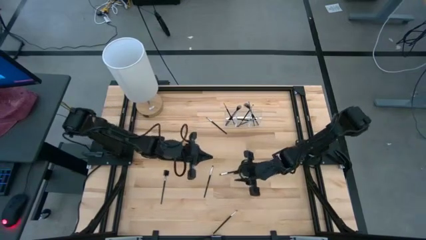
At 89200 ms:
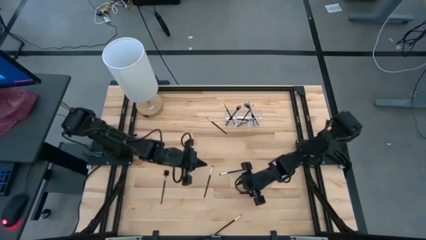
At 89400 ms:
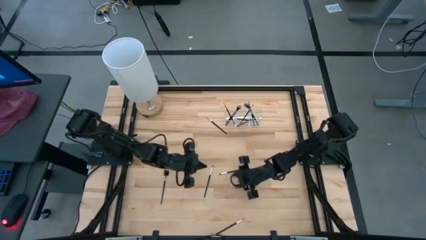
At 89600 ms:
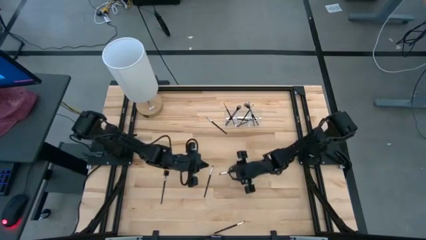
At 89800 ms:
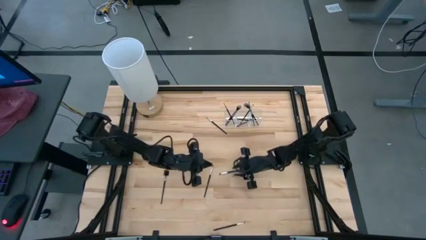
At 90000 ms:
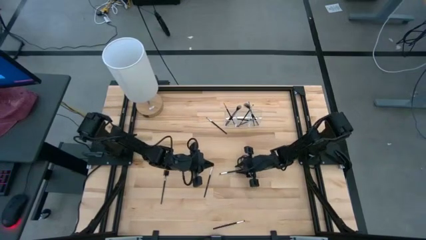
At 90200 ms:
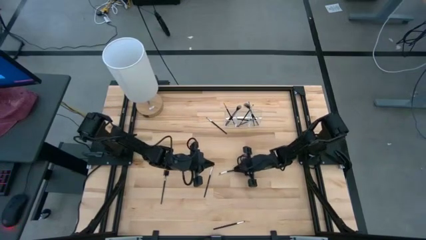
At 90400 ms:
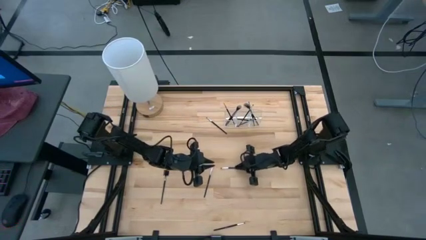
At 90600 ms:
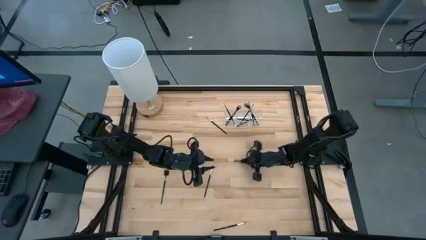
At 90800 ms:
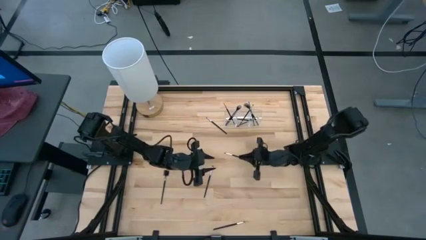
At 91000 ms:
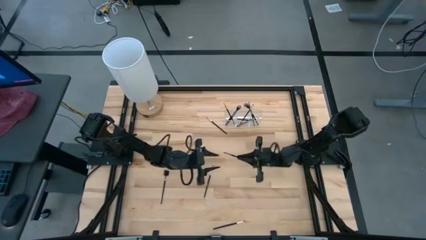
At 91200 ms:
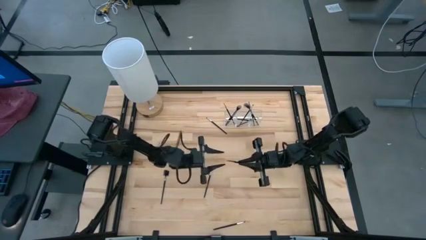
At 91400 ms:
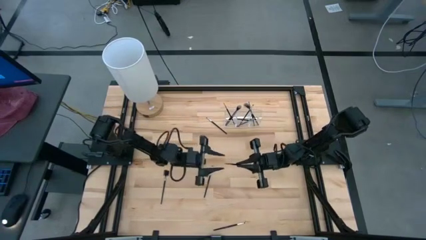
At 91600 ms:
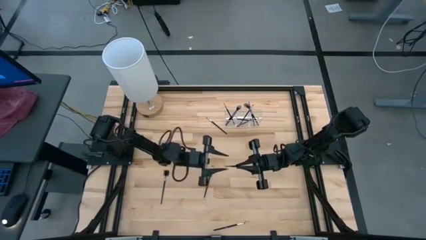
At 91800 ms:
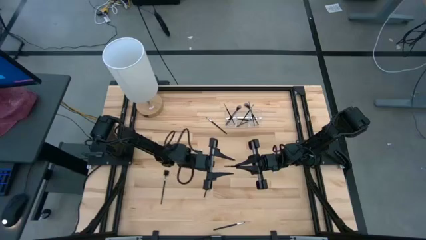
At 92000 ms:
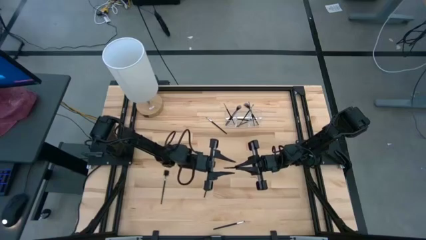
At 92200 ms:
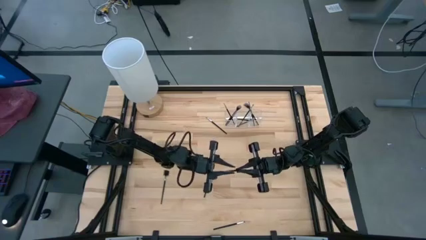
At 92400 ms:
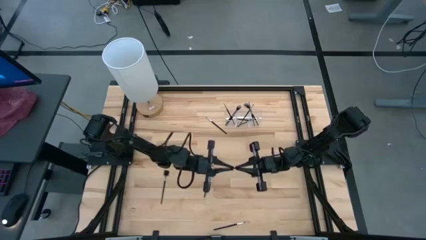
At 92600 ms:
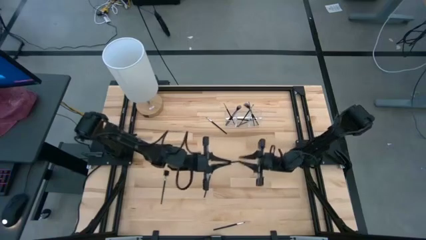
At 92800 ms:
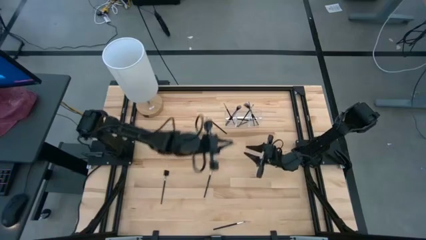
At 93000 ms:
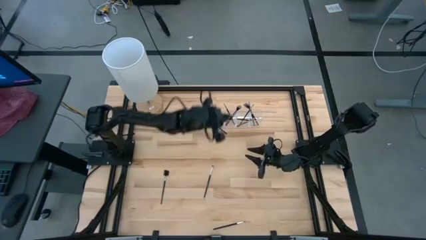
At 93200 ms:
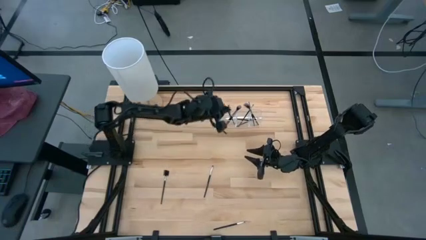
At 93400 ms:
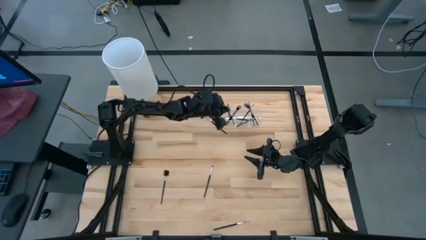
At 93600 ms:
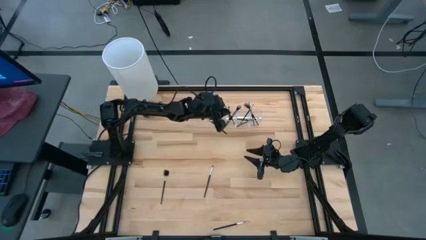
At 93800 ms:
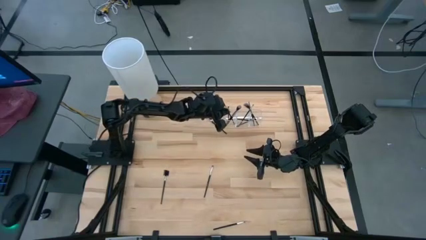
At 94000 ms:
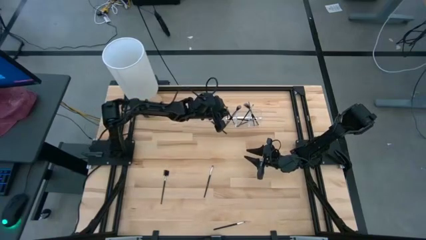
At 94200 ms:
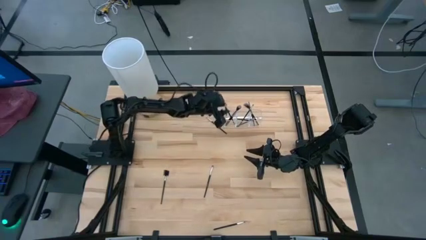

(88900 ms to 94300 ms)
Task: Put items in baskets/containers
Put the black eyeshadow brush into the transparent organizer

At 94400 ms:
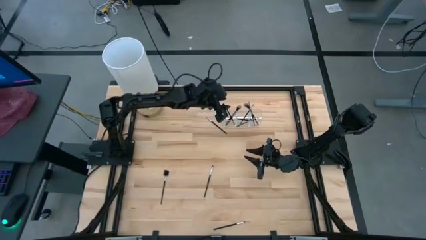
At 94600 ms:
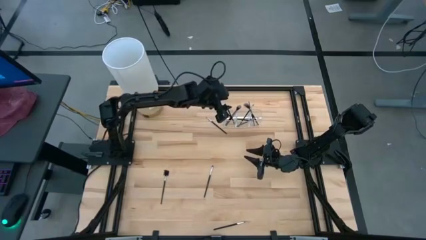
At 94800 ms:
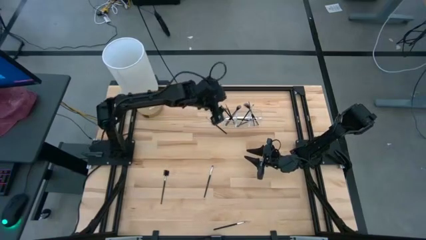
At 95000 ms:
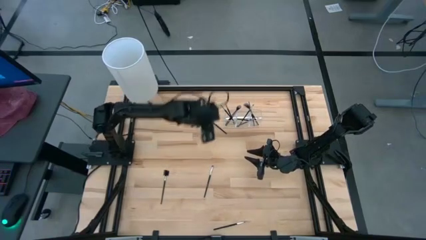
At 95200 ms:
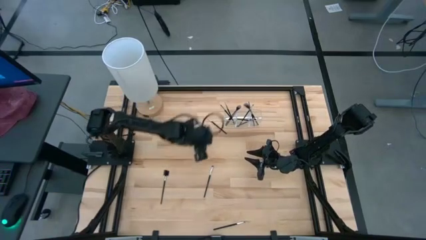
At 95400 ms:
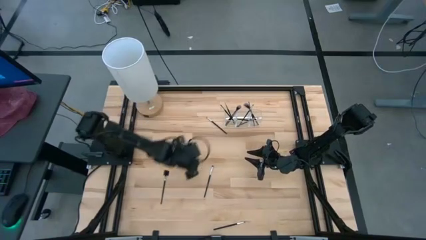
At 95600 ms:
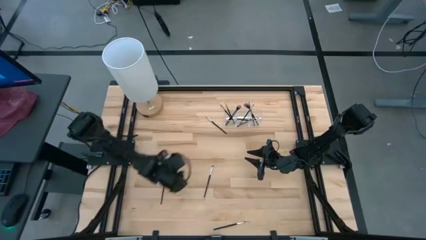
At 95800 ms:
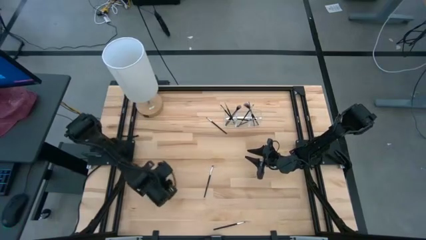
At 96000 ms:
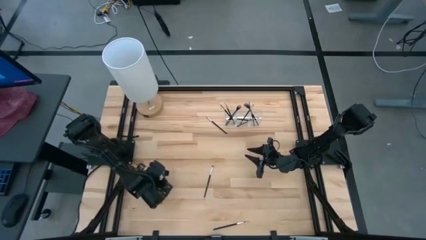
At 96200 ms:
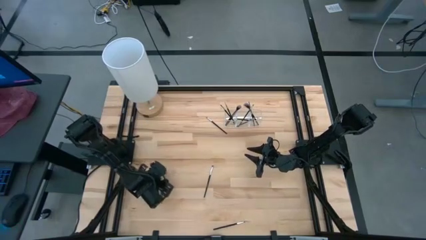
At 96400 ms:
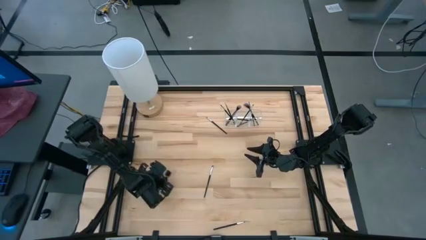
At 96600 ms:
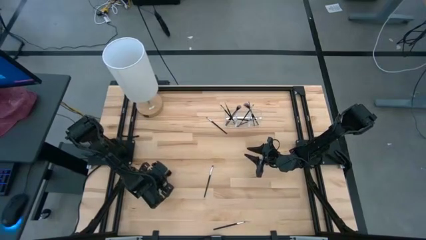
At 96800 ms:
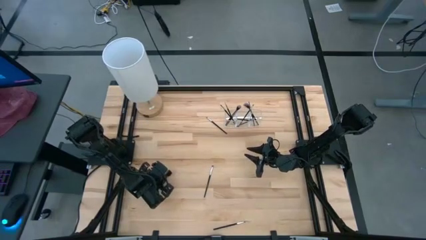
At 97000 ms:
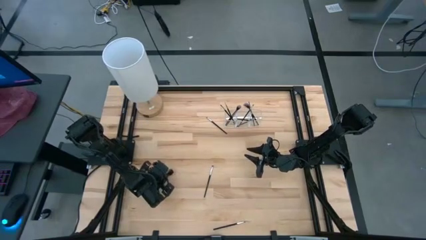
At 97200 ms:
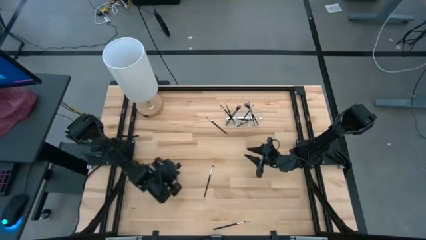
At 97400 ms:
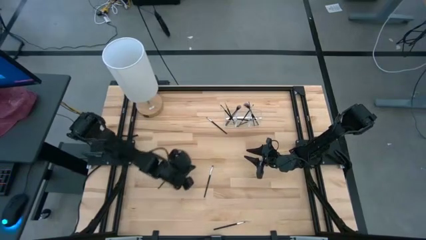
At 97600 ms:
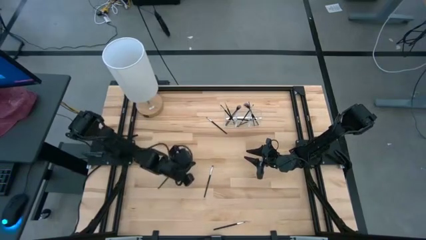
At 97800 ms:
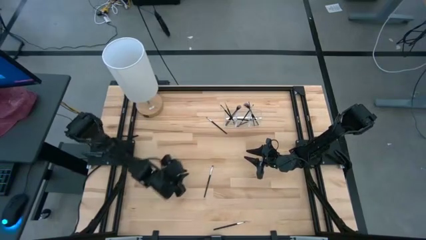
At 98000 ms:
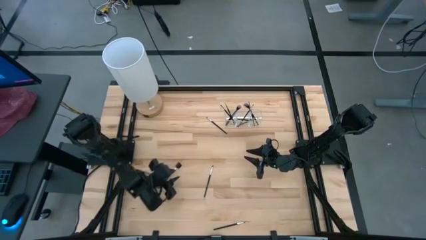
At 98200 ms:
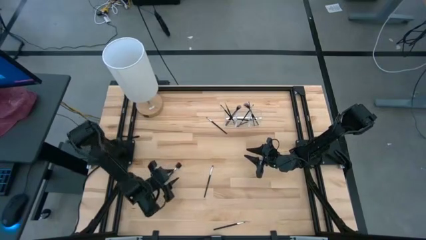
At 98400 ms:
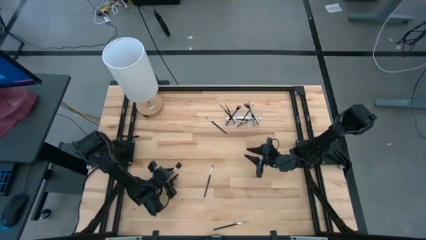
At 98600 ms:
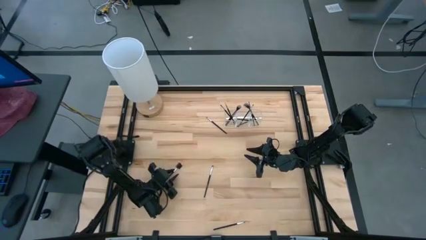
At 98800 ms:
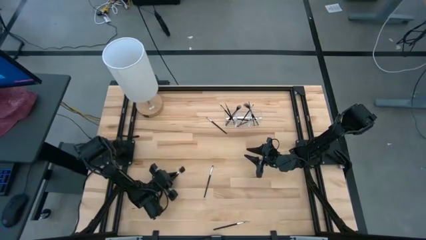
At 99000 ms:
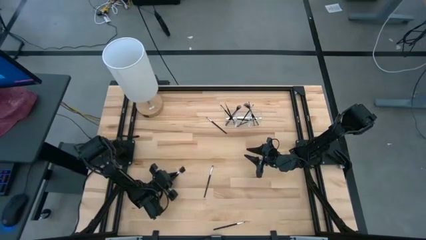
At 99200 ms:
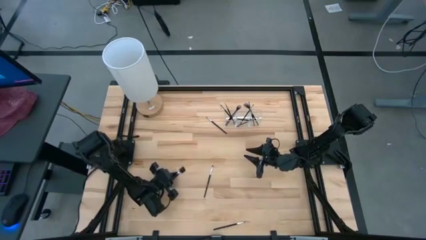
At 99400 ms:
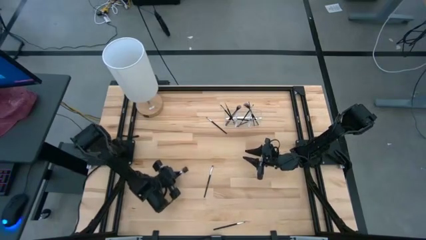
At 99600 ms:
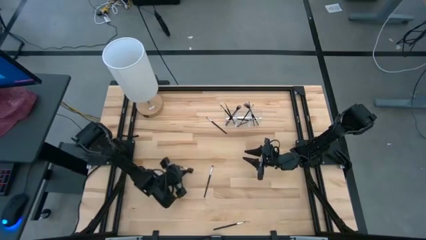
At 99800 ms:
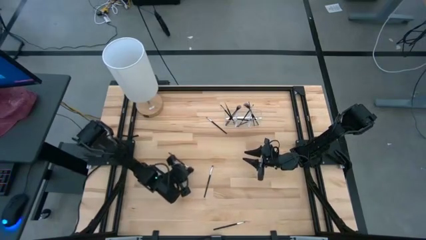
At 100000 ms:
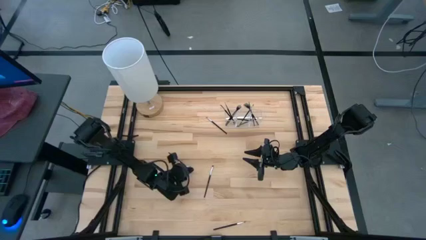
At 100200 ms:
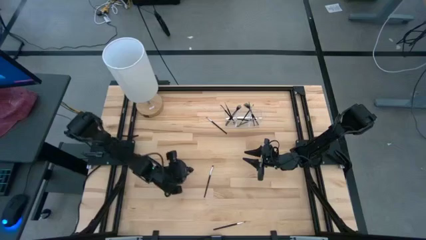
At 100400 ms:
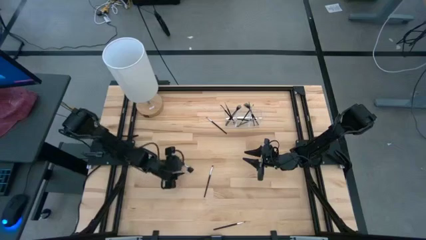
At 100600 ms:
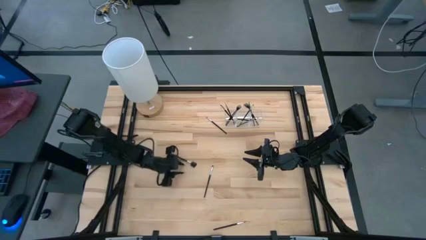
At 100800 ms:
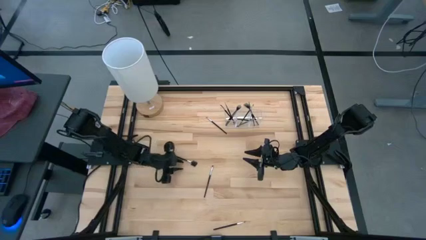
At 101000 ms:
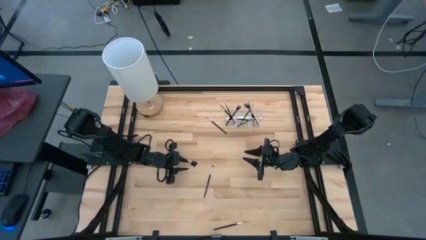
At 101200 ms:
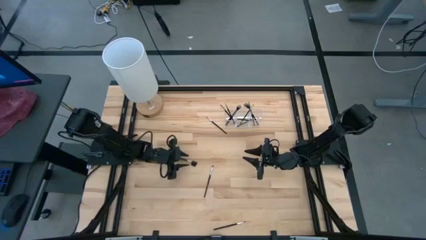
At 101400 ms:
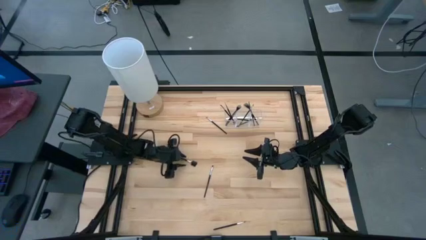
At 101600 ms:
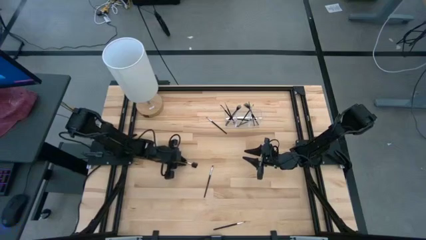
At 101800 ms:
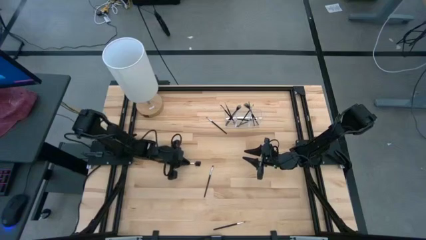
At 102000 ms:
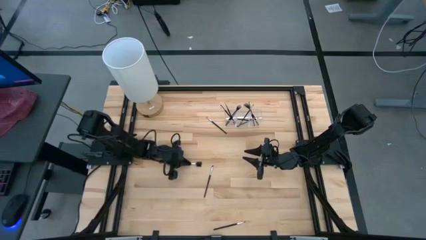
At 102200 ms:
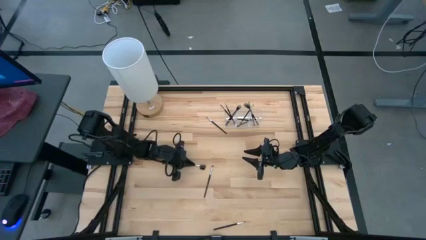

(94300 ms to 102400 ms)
Put the black eyebrow brush into the transparent organizer
